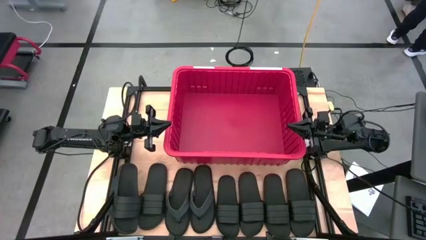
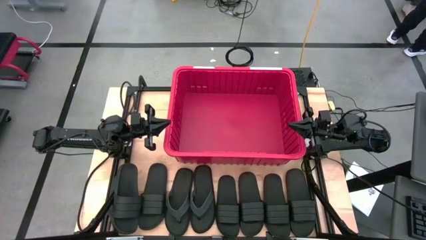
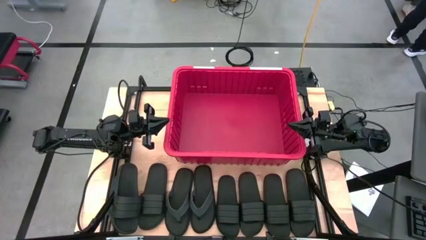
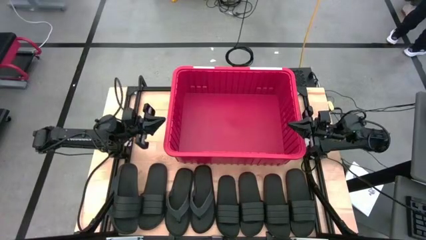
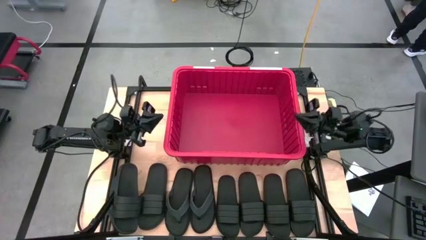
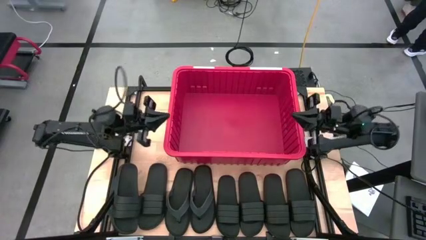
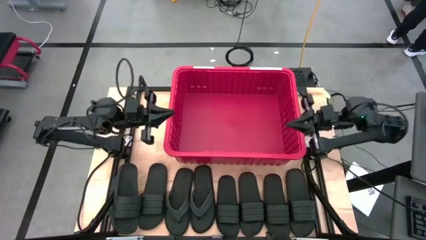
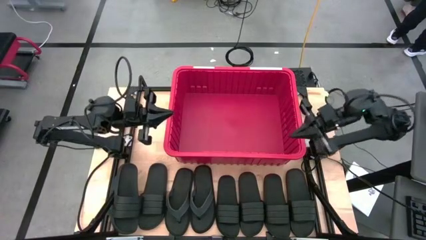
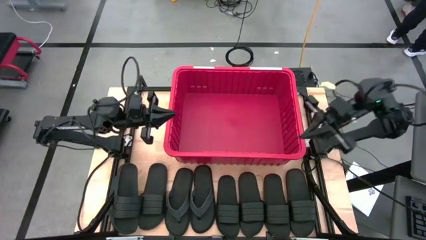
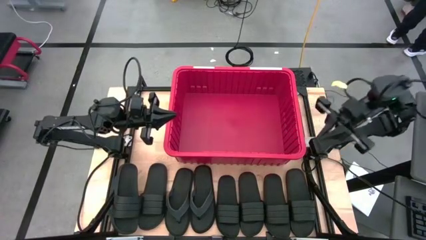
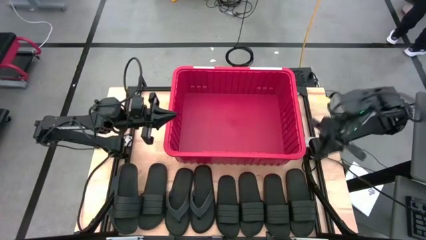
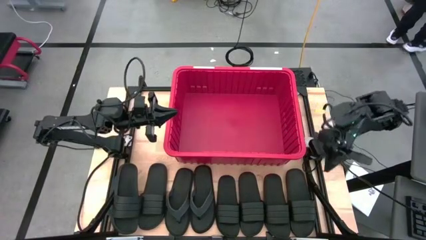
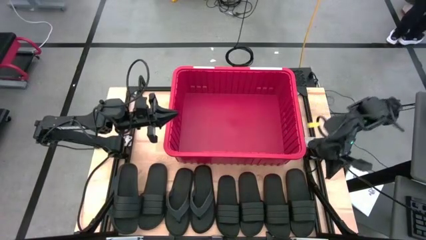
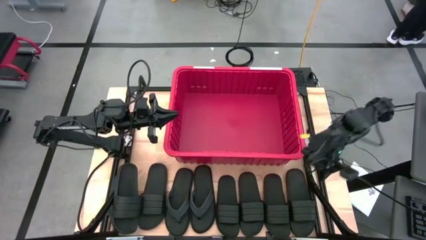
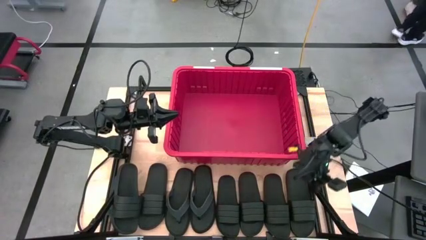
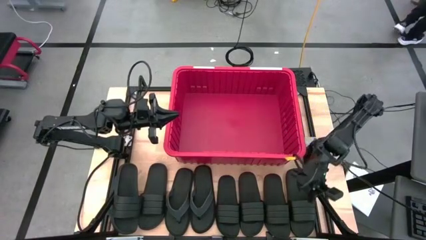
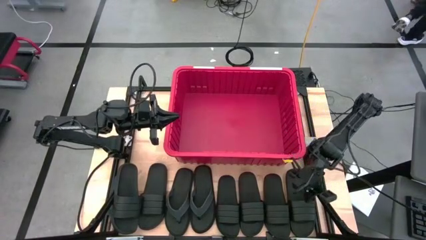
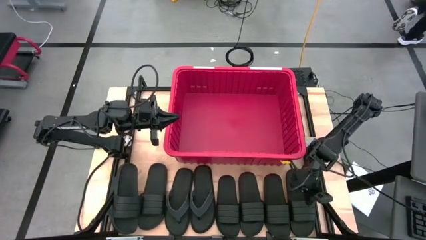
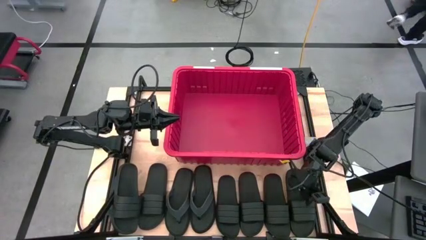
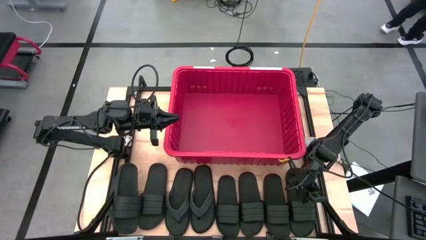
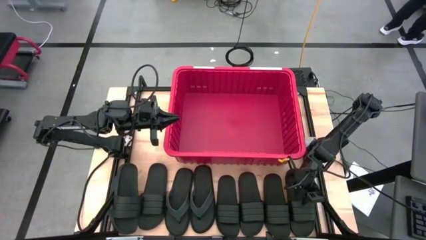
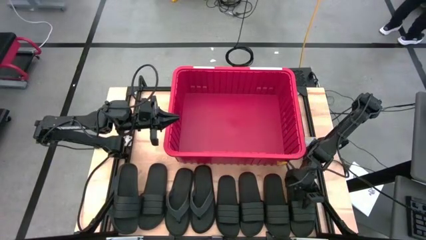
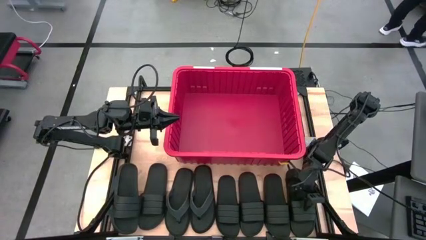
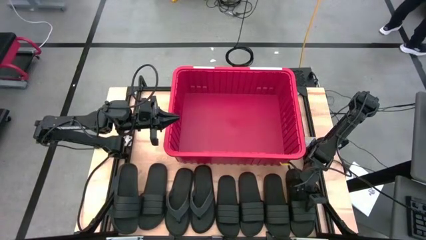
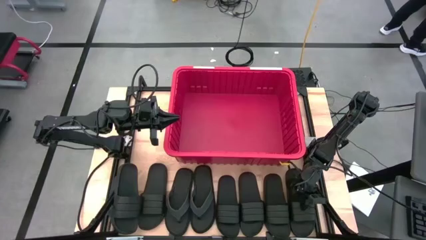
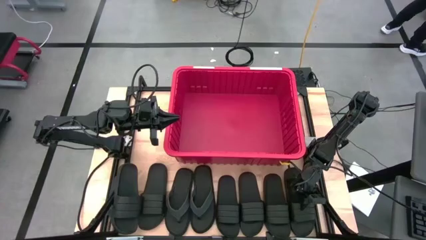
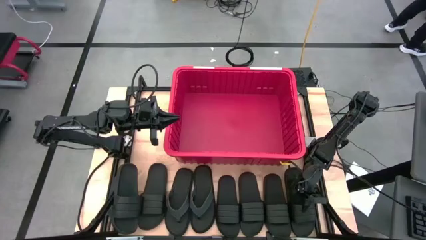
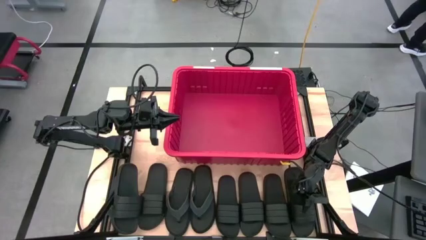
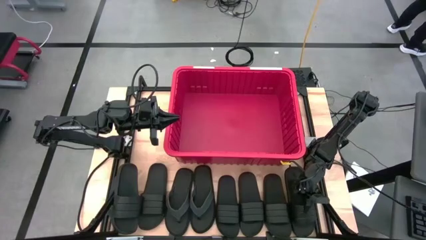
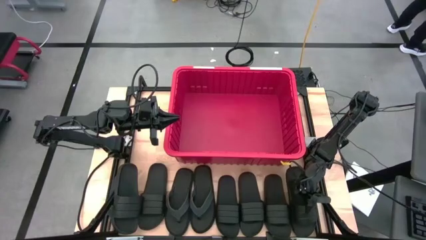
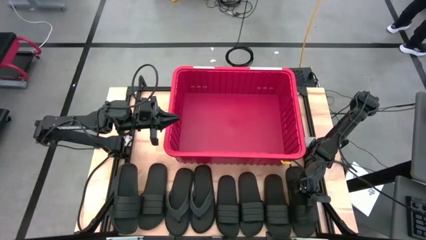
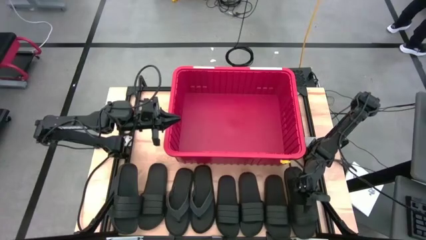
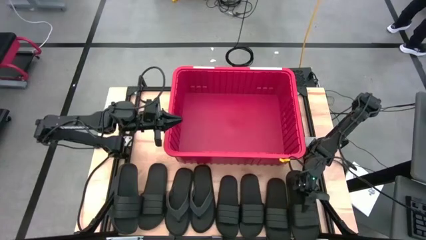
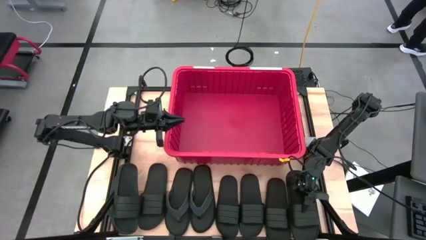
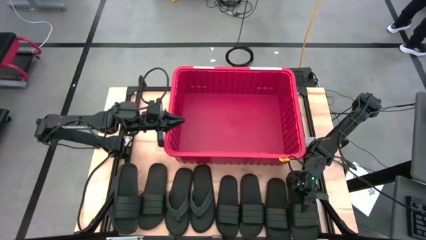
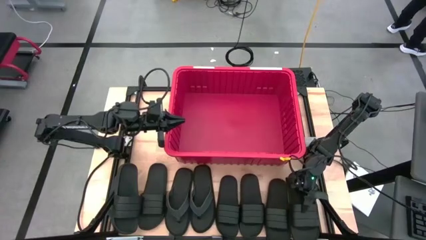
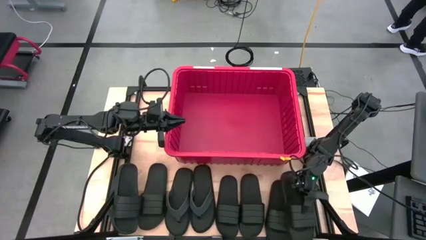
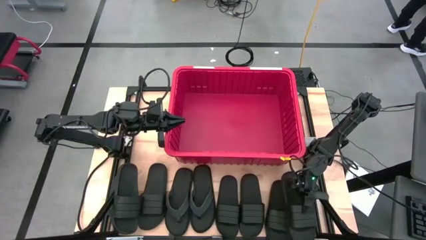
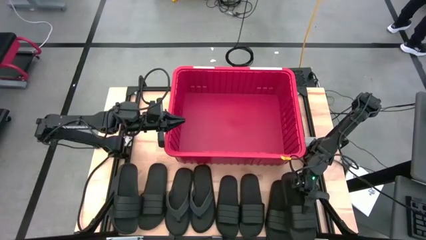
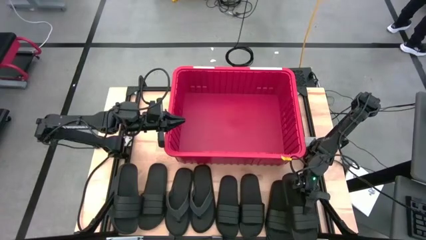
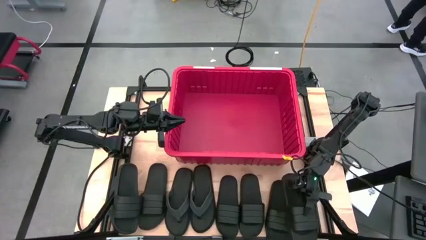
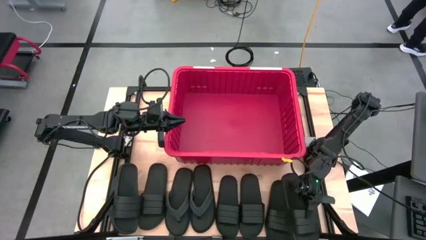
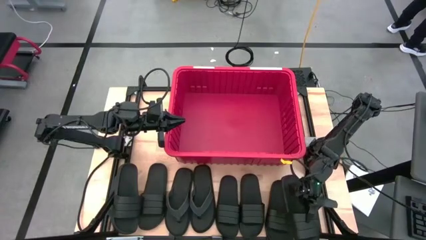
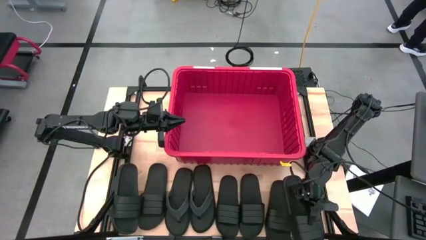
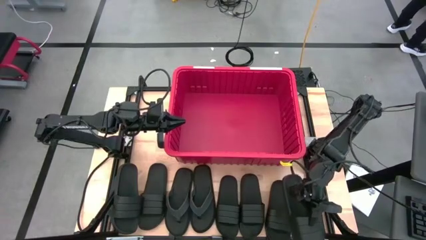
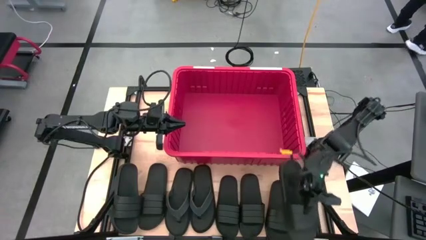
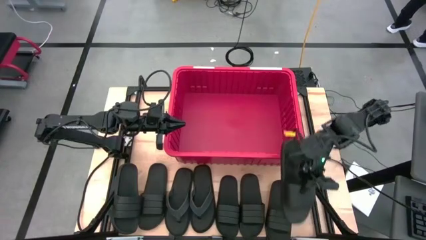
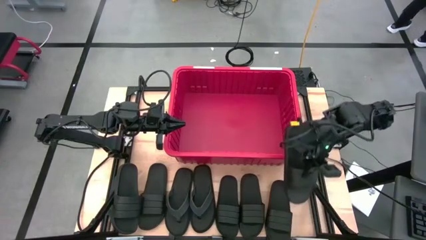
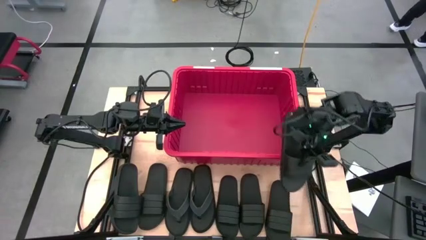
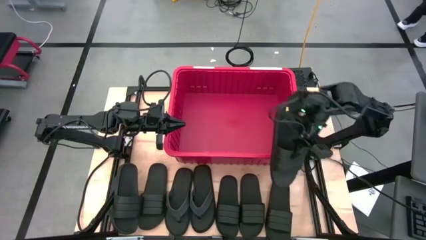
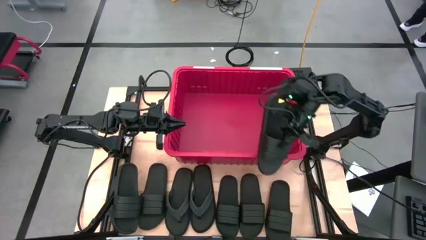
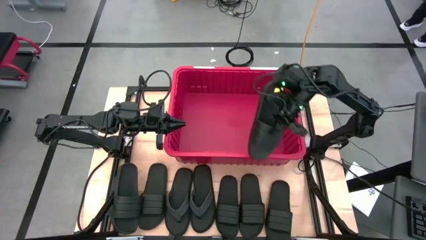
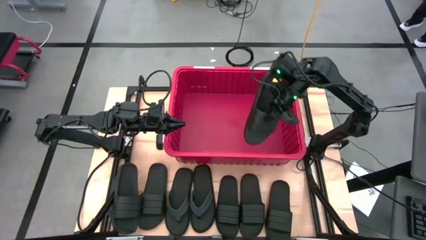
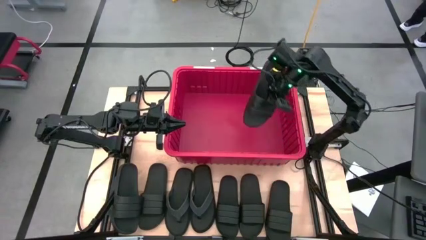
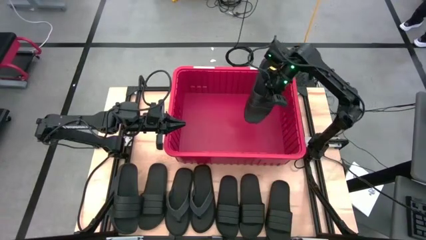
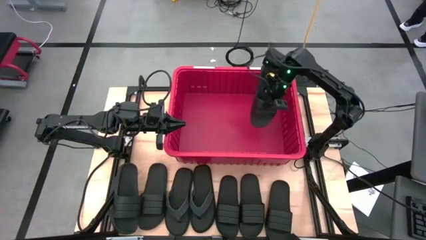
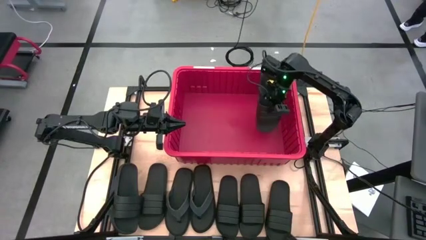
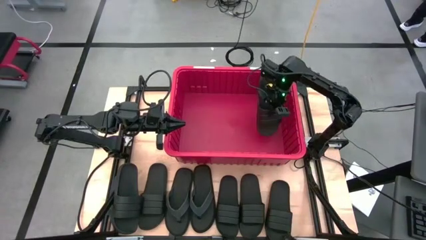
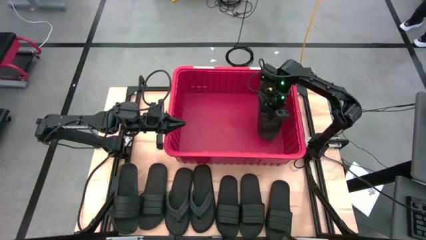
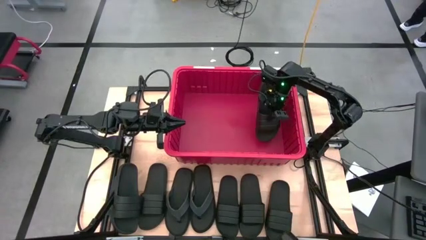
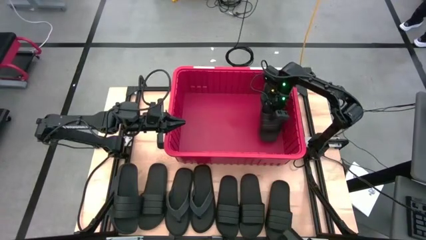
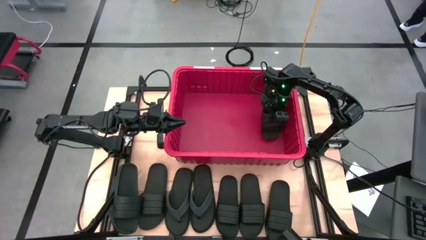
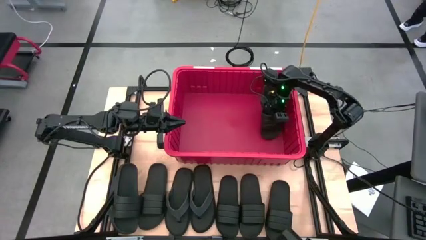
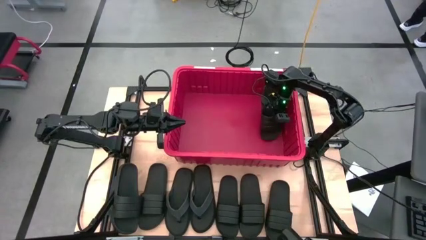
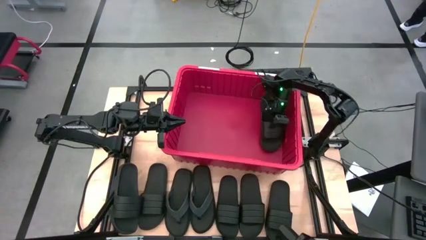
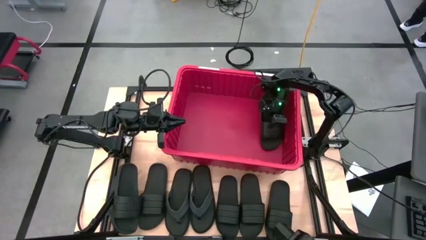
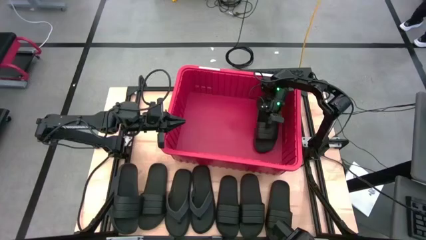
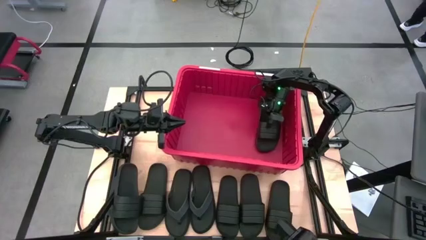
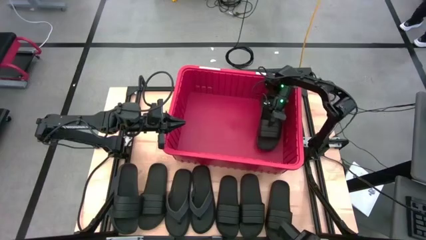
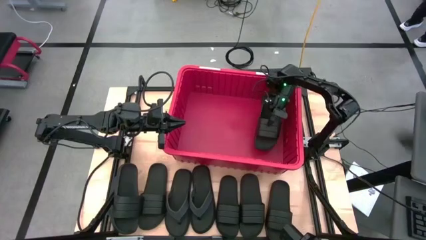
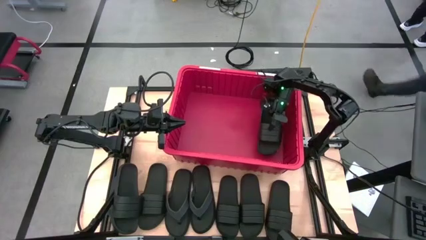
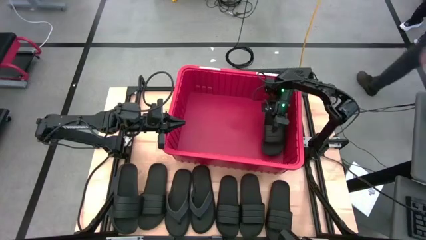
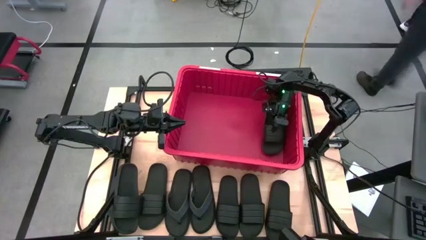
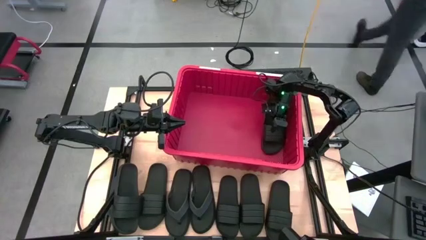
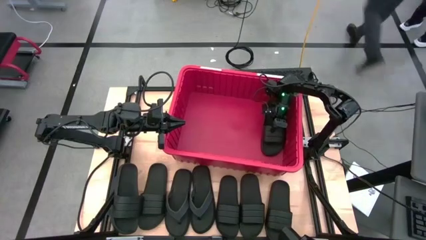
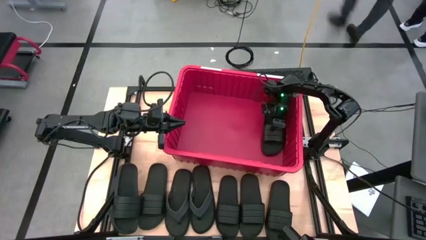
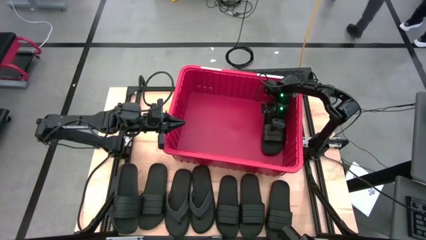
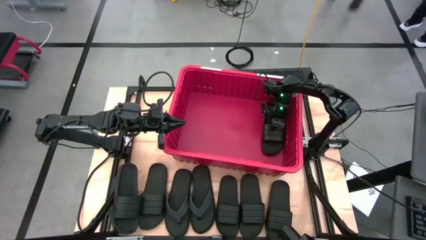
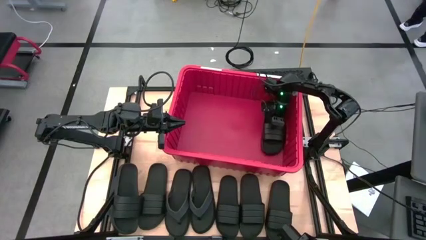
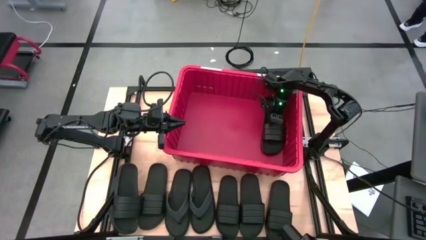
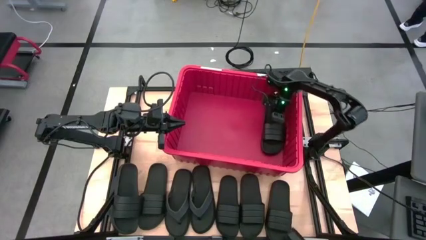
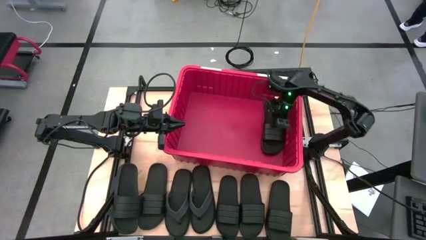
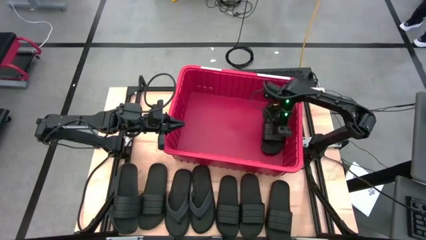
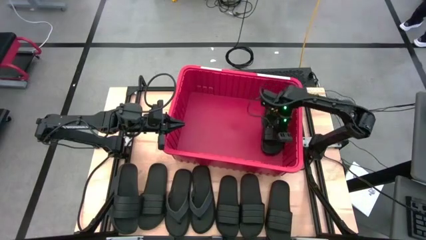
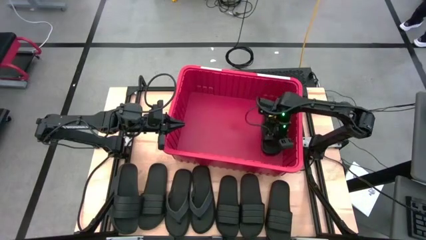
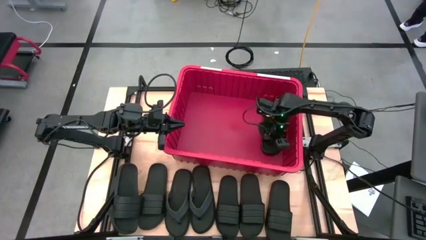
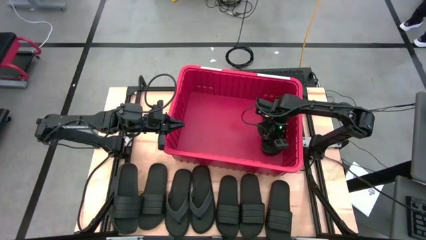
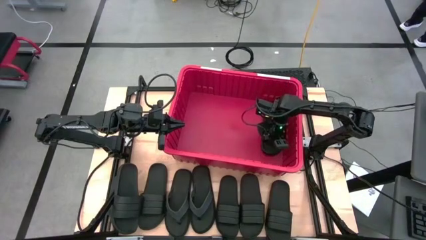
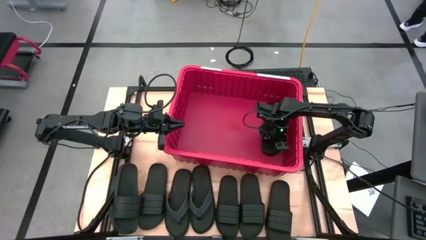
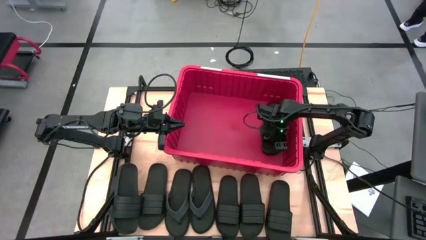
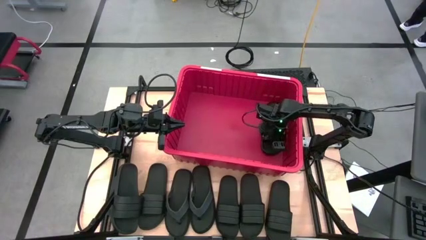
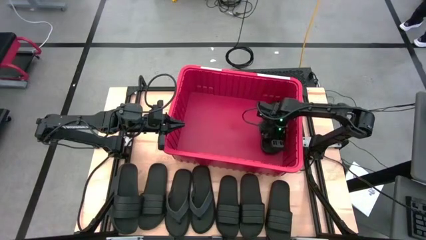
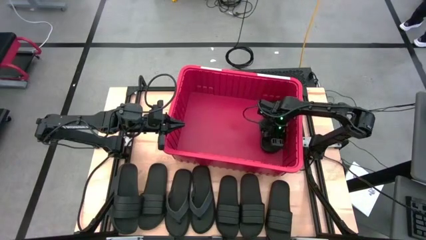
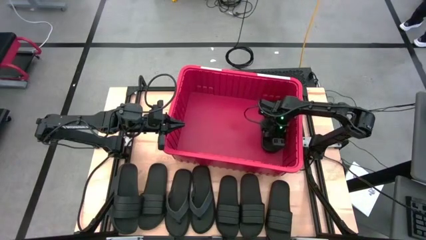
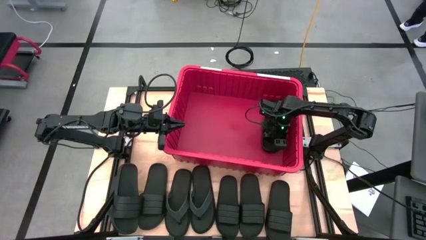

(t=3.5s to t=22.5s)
Task: Pick and place slides into bin
Put the slide into the bin
